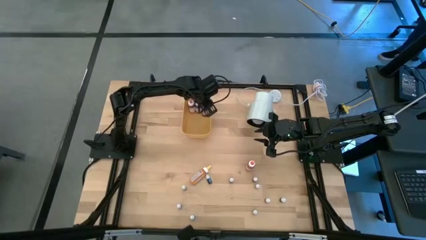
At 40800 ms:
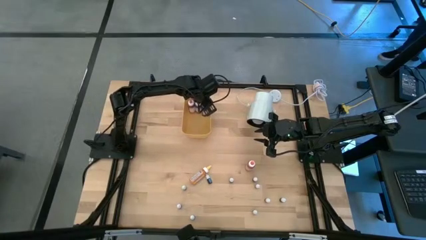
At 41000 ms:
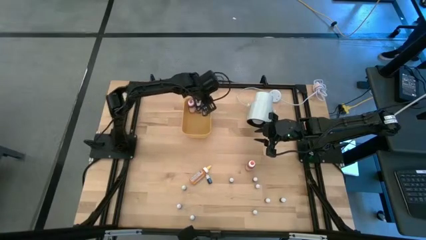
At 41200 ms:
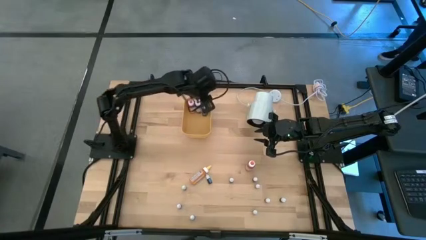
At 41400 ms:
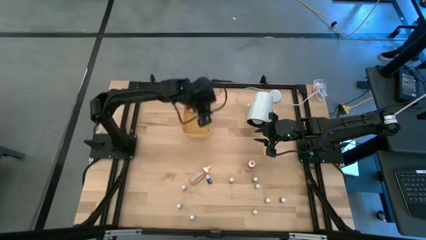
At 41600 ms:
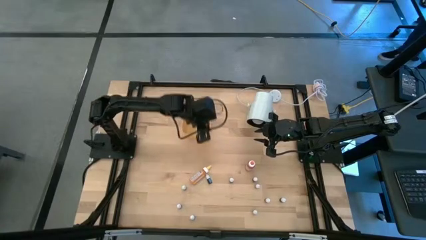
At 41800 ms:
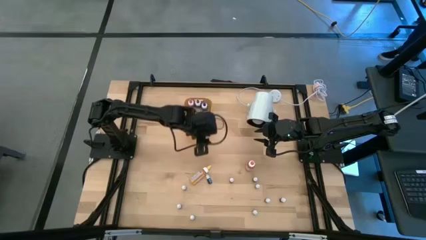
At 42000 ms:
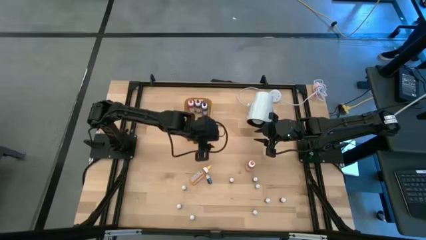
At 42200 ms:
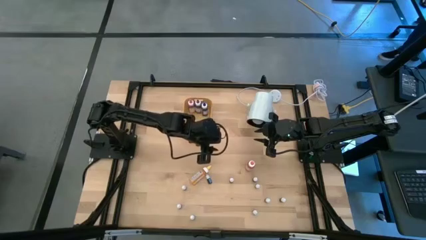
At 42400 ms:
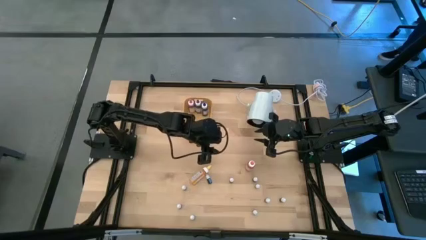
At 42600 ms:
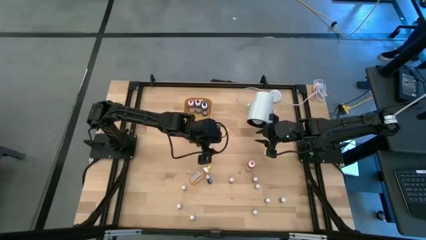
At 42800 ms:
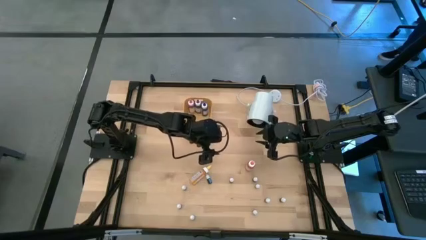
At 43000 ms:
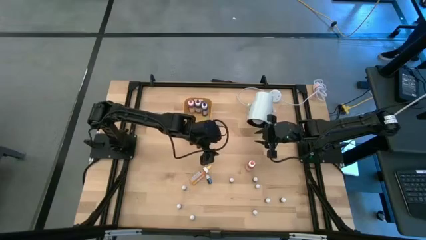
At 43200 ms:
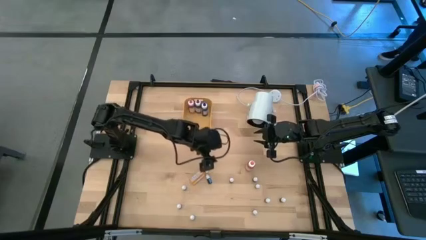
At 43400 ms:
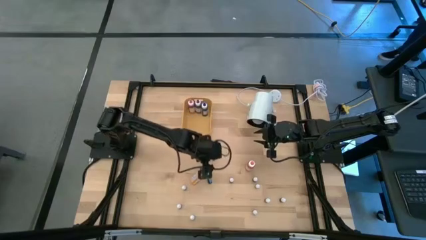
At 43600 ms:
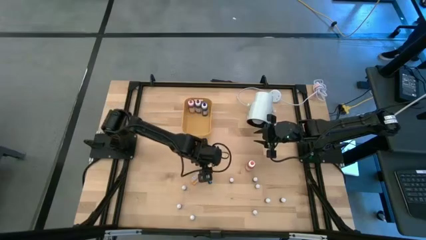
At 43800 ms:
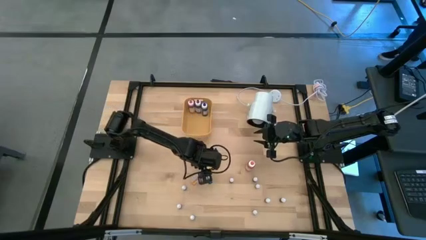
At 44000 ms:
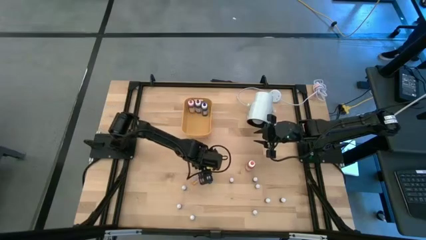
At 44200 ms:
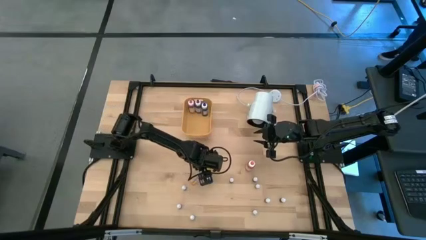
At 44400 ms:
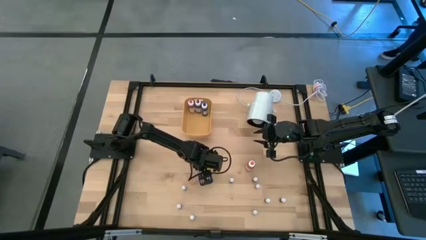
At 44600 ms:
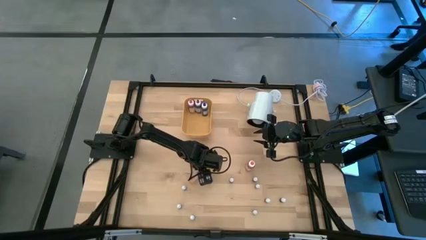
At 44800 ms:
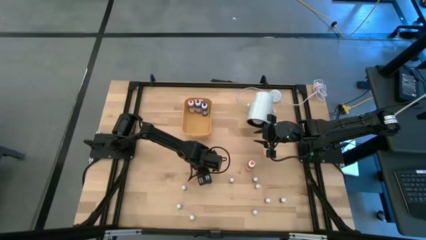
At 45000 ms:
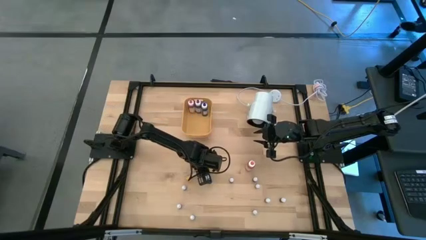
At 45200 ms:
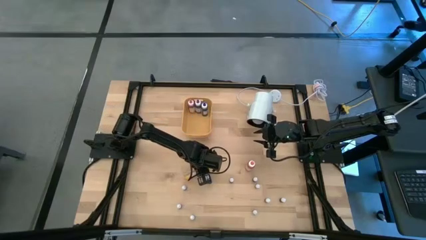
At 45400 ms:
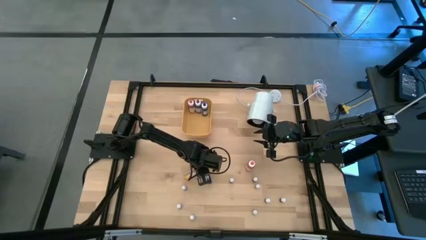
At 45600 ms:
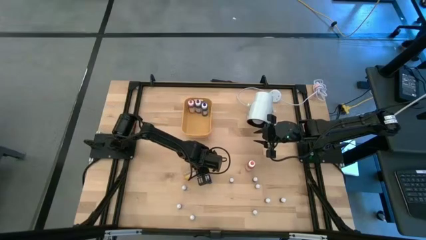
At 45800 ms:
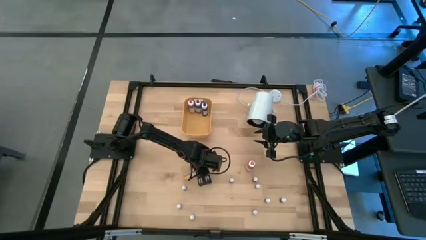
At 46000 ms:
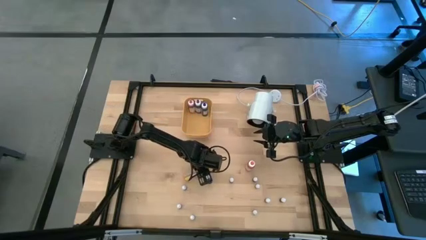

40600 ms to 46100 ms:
Task: Pick & Place food coloring
Put the large yellow food coloring bottle into the yellow bin

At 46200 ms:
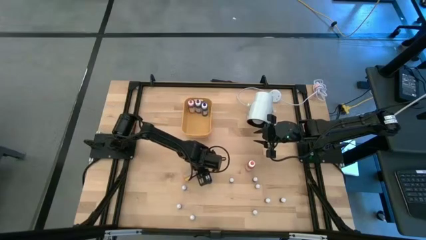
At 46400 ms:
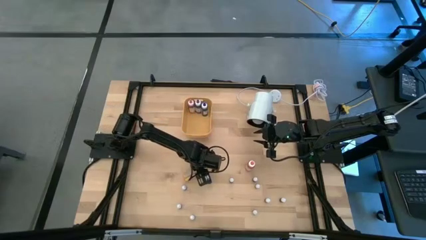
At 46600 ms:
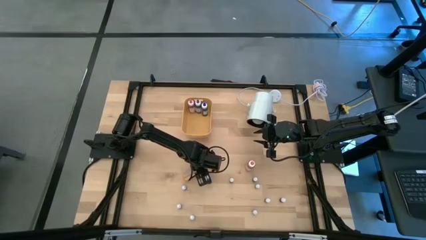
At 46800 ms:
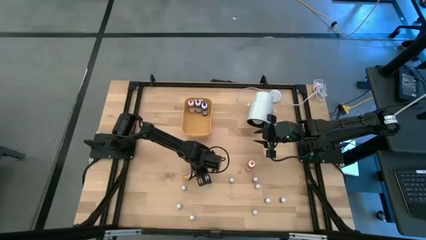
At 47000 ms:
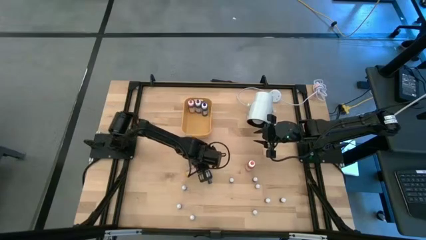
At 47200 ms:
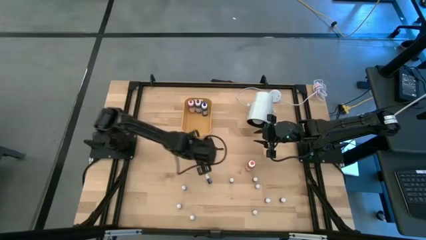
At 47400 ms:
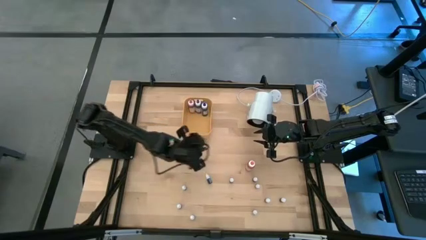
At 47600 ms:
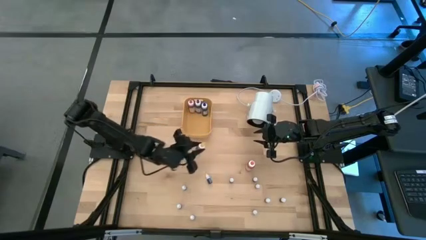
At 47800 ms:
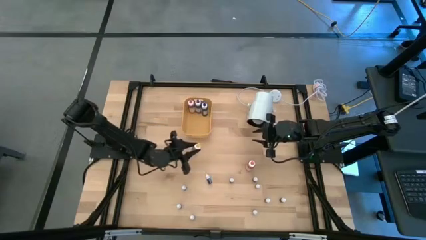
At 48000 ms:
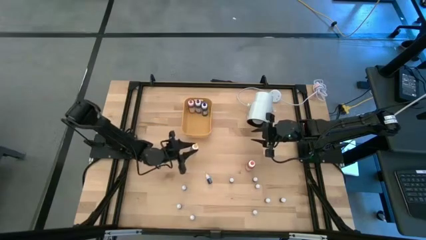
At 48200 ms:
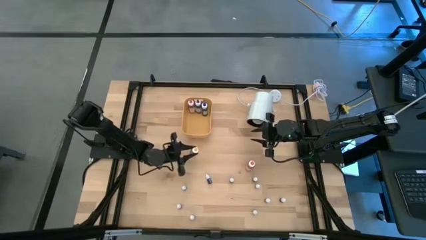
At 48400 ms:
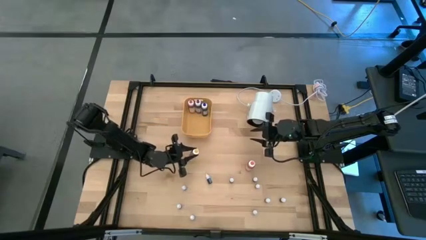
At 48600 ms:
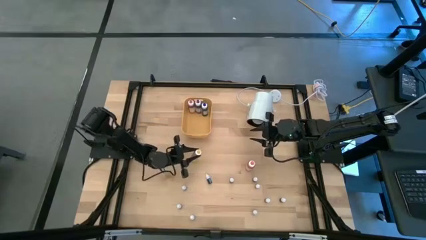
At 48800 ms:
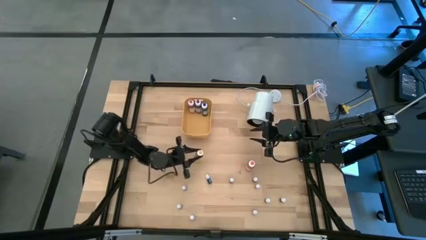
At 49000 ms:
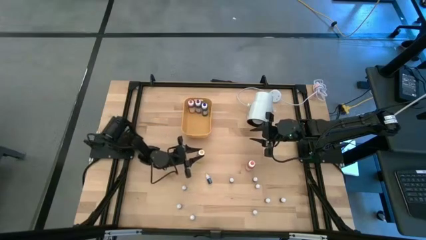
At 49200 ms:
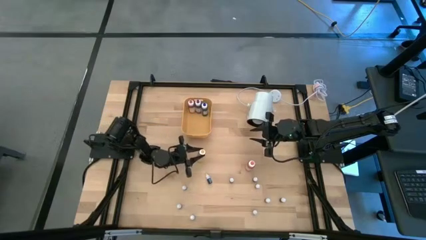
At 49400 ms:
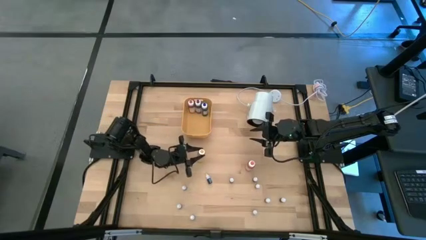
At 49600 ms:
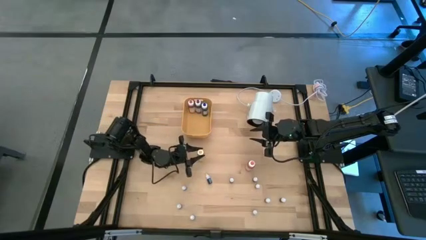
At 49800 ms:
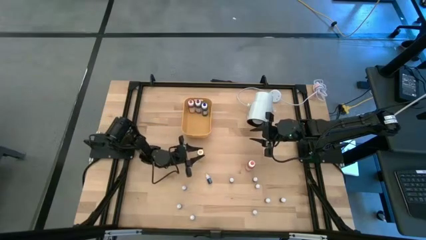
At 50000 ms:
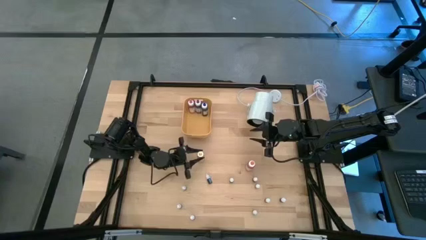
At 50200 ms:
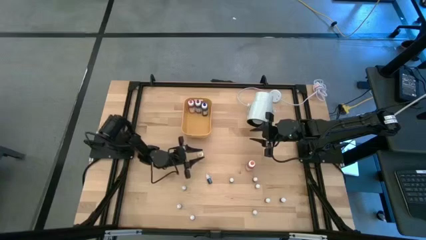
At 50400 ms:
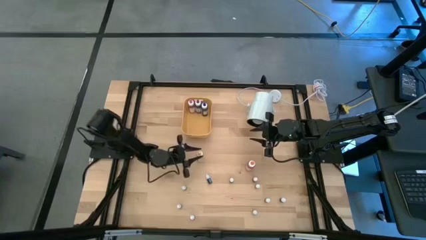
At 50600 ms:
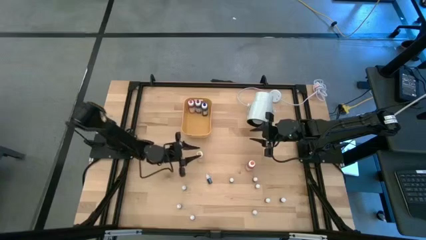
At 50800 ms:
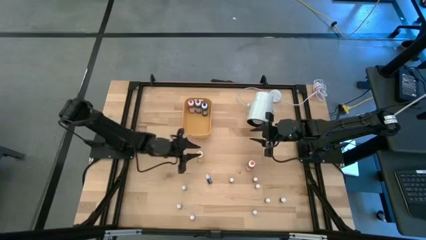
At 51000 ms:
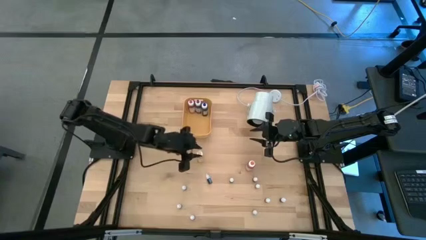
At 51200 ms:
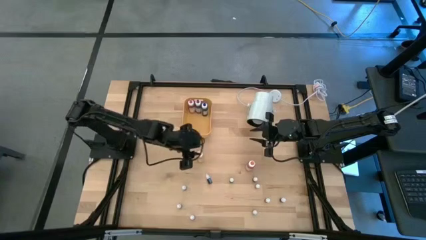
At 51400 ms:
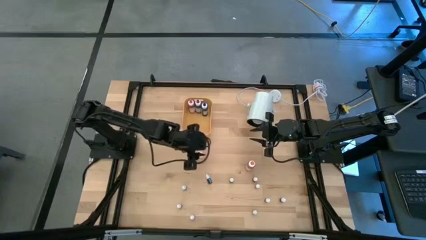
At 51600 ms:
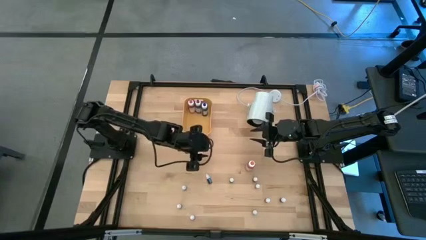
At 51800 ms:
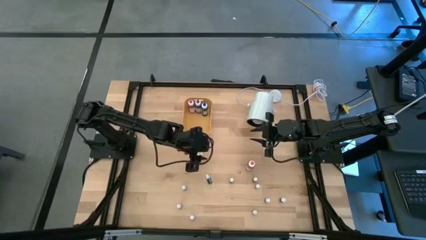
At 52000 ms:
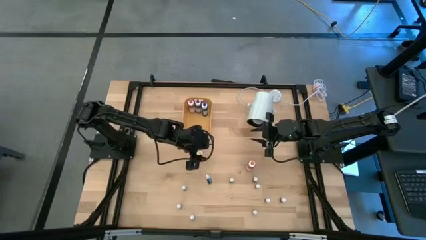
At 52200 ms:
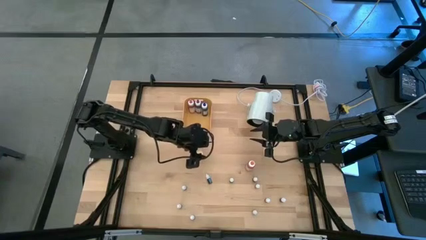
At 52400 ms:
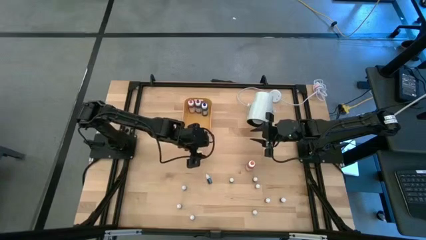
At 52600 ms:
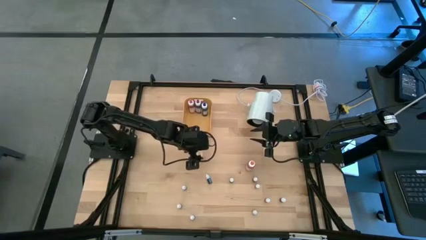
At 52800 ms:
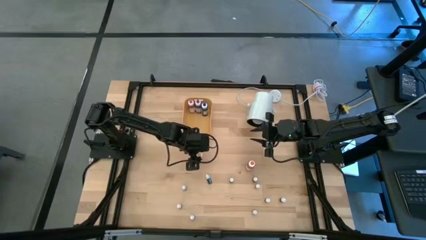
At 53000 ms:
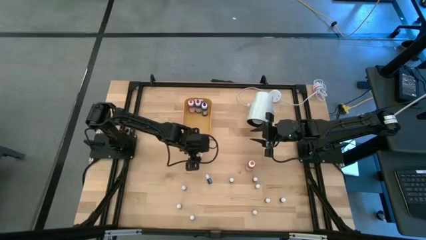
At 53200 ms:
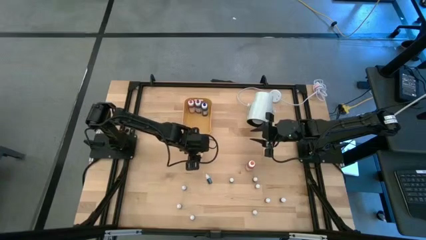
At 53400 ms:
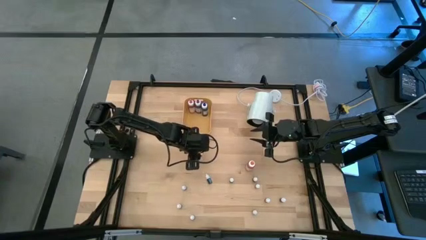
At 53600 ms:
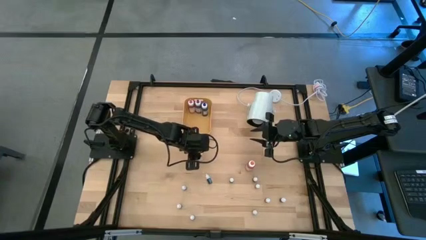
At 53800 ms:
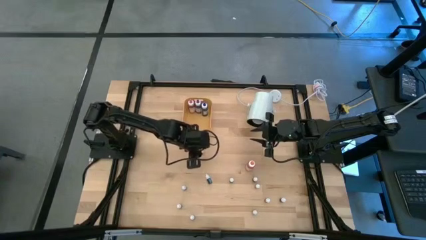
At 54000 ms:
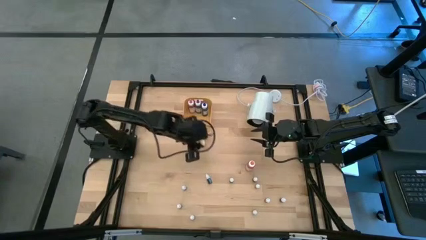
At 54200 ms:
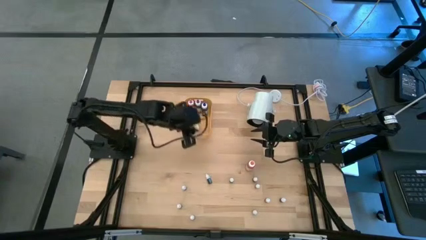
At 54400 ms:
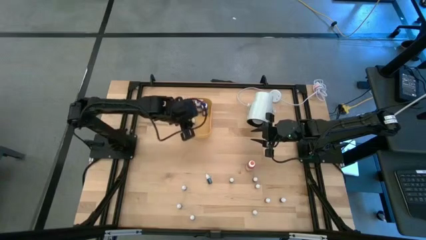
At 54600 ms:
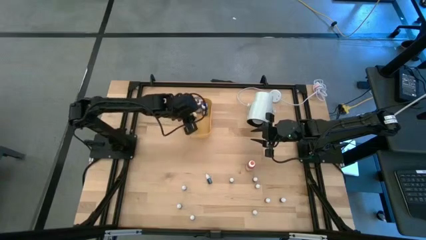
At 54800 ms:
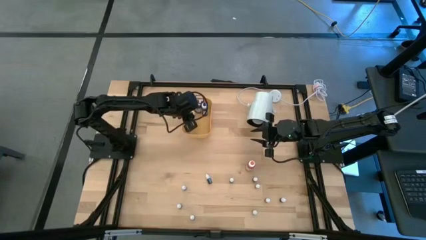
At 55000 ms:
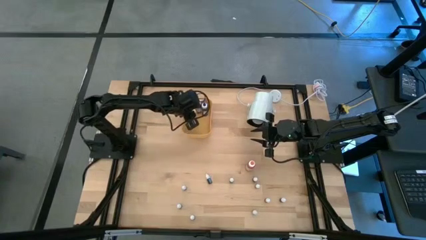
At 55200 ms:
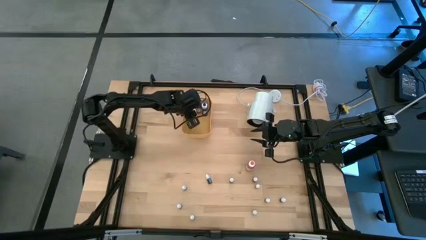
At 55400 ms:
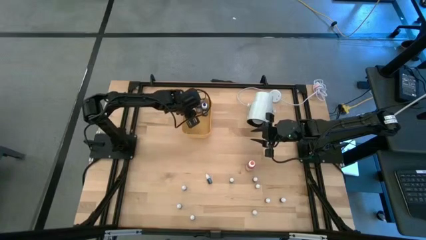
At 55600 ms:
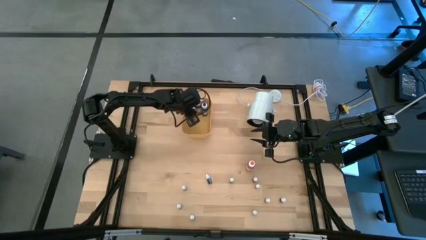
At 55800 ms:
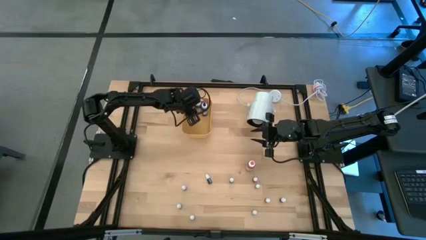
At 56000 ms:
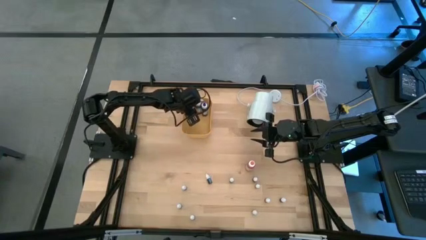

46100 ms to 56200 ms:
Put the large yellow food coloring bottle into the yellow bin
